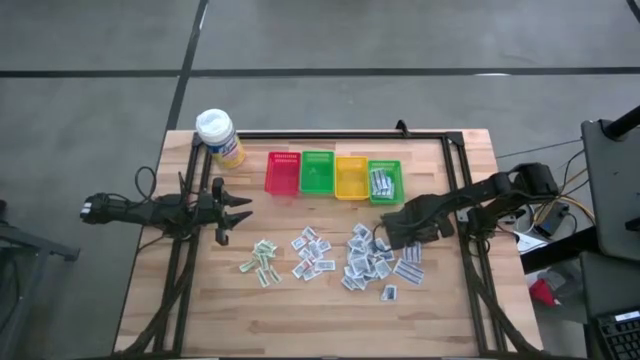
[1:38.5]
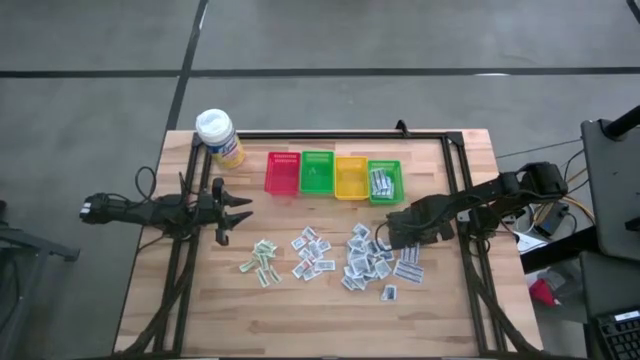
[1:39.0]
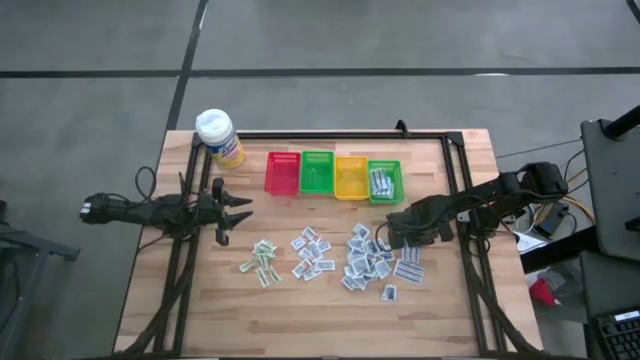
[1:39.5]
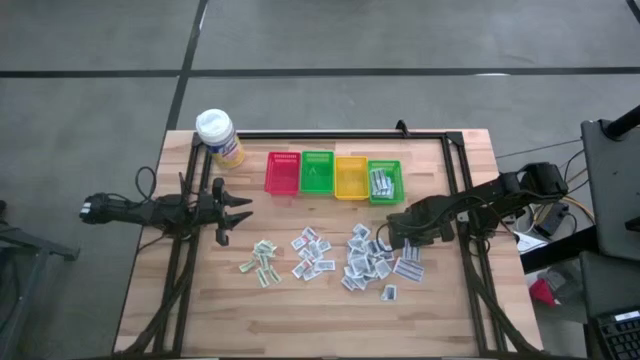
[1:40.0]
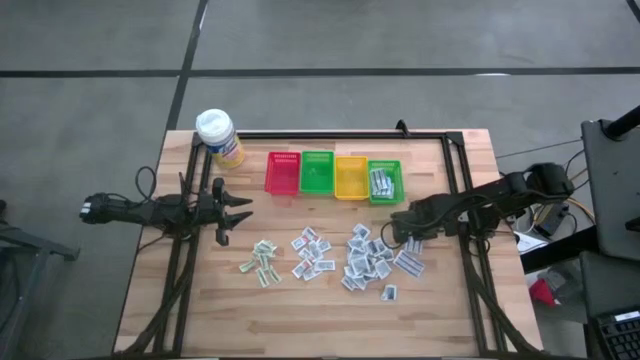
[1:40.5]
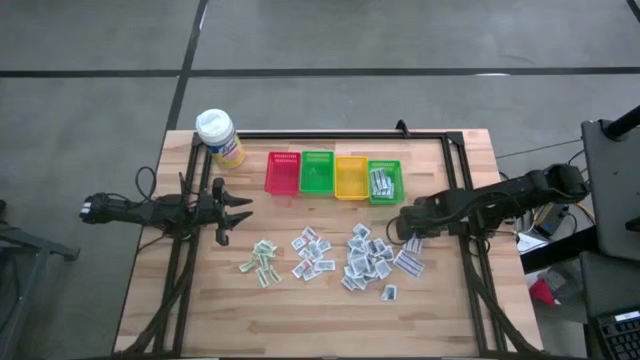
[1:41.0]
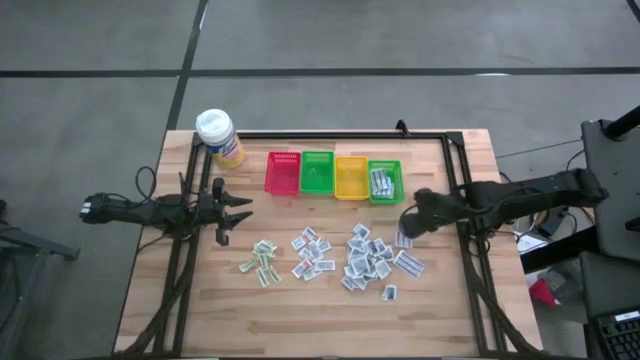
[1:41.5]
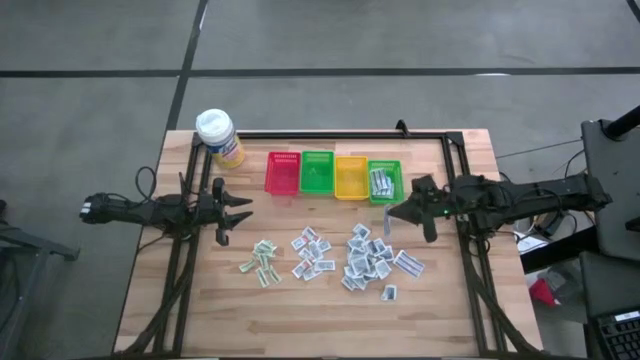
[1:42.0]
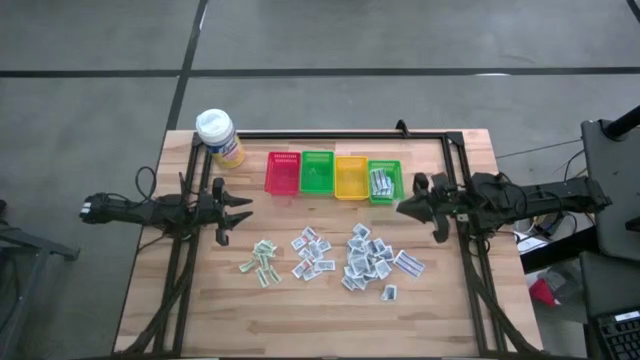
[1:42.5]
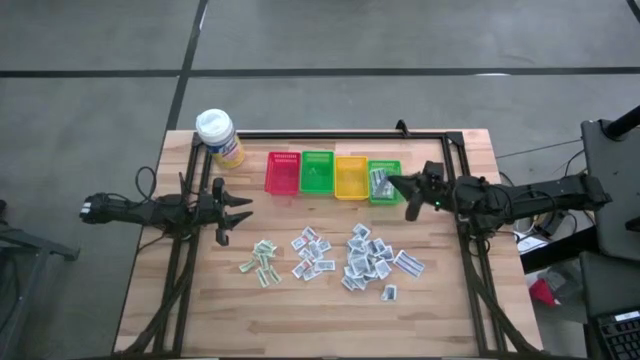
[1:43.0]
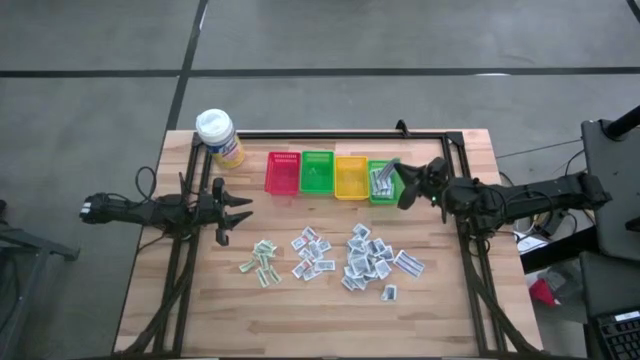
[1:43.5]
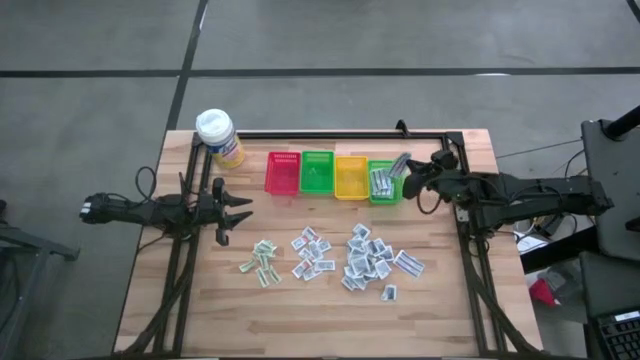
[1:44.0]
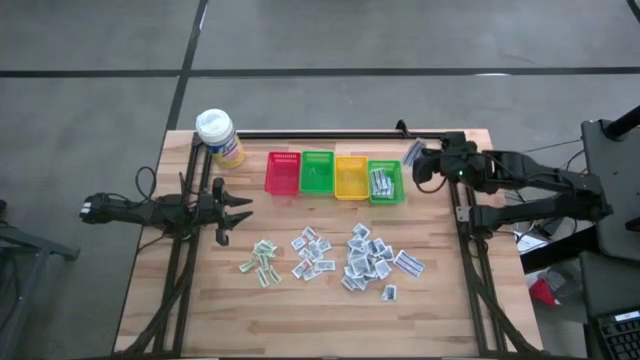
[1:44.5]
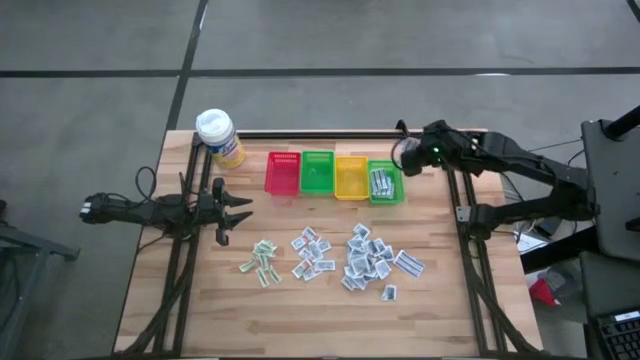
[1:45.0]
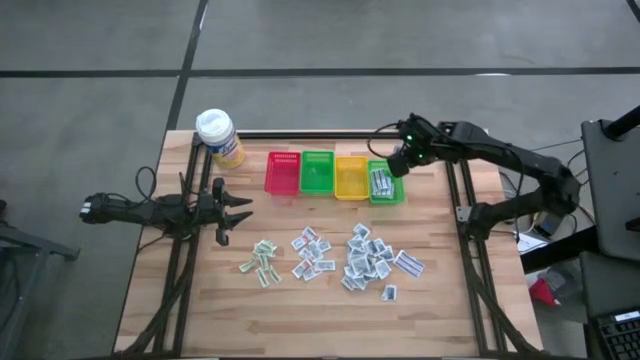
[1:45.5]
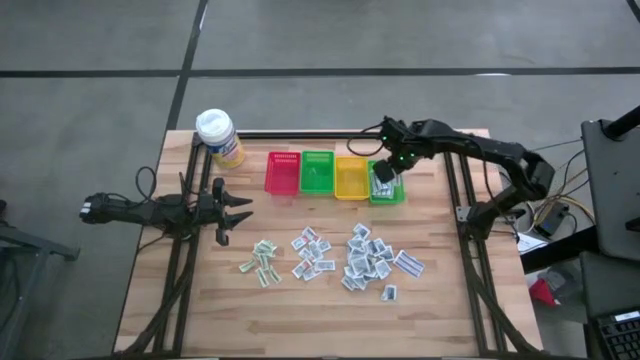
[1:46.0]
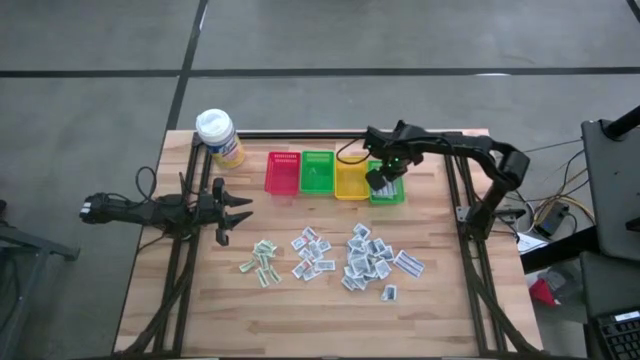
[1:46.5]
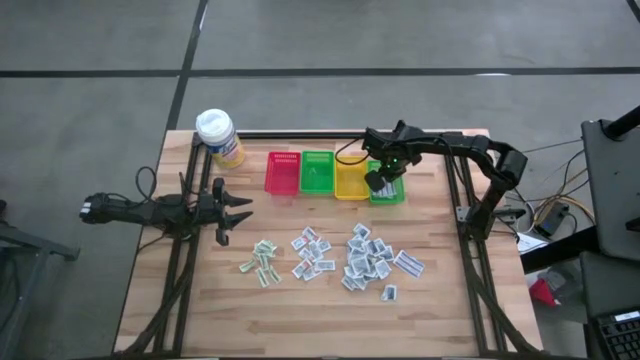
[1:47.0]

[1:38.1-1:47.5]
Task: Pick & Place First Aid Supplies
Put the blue bandage into the right green bin

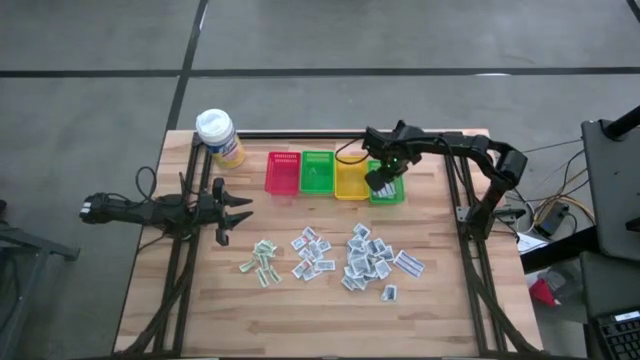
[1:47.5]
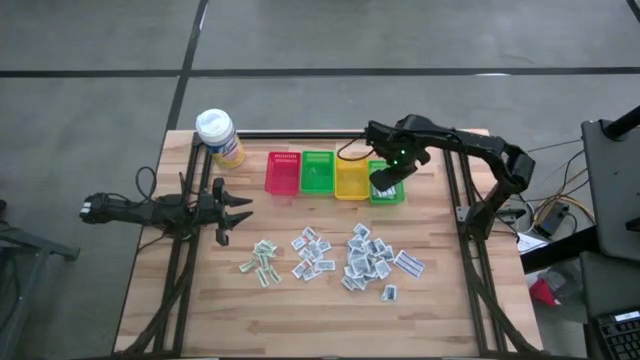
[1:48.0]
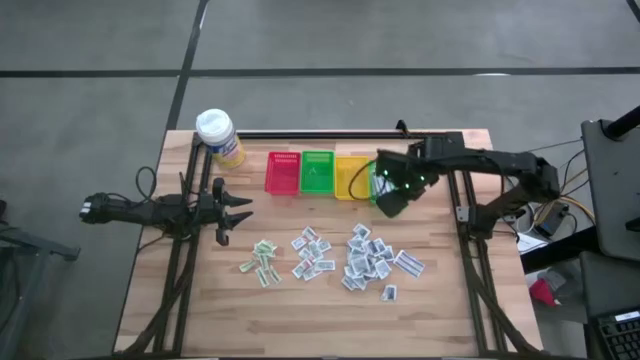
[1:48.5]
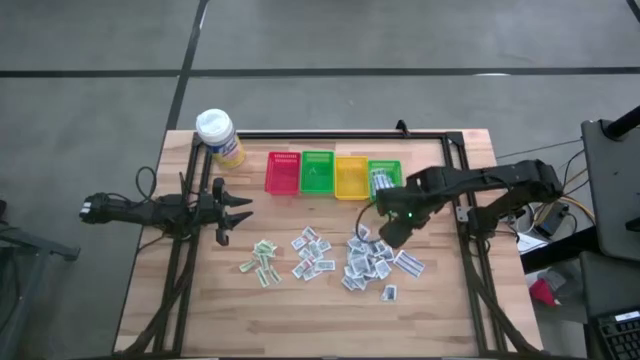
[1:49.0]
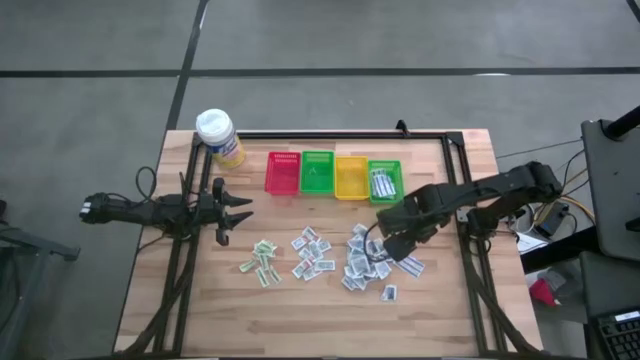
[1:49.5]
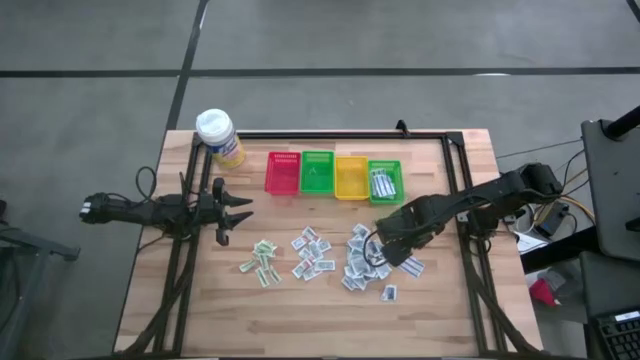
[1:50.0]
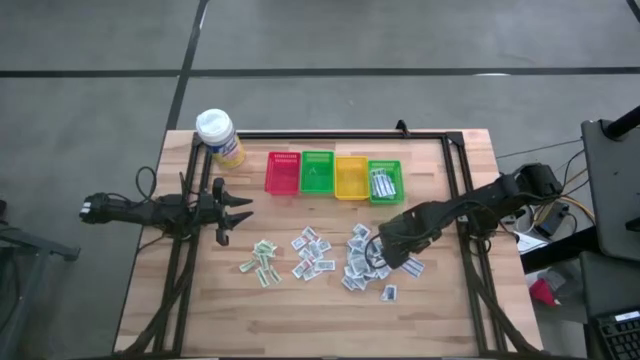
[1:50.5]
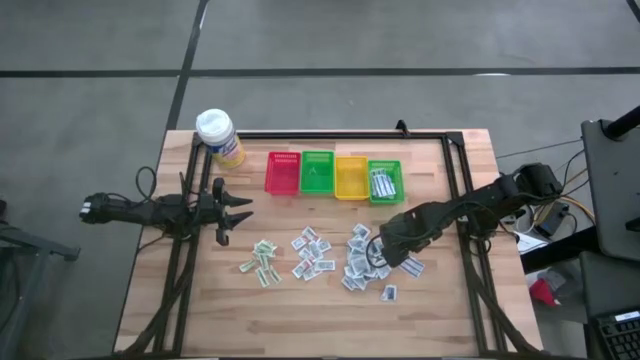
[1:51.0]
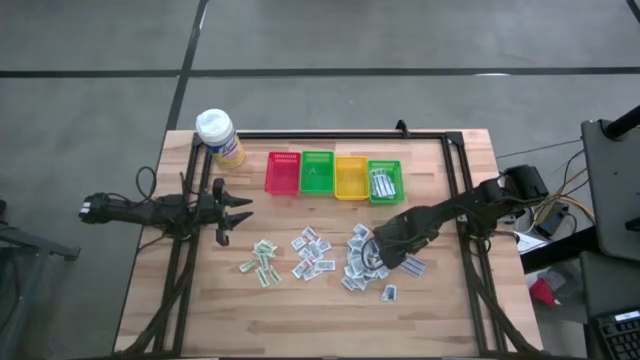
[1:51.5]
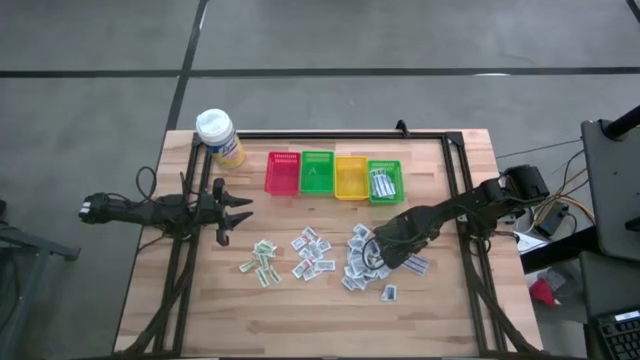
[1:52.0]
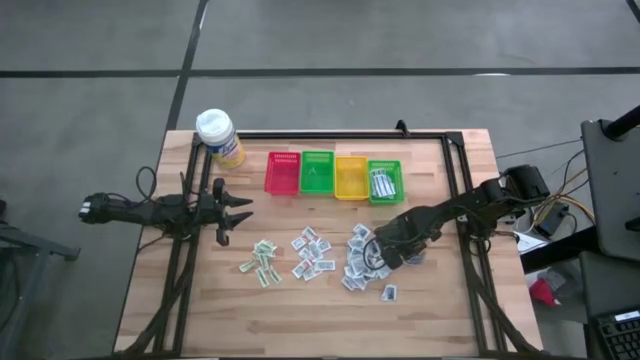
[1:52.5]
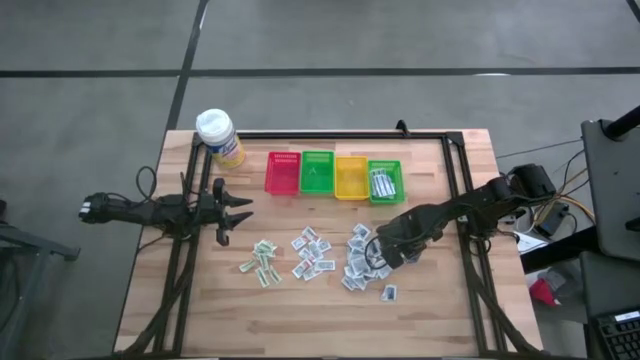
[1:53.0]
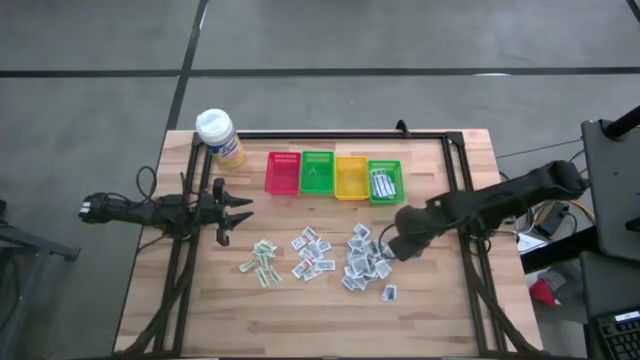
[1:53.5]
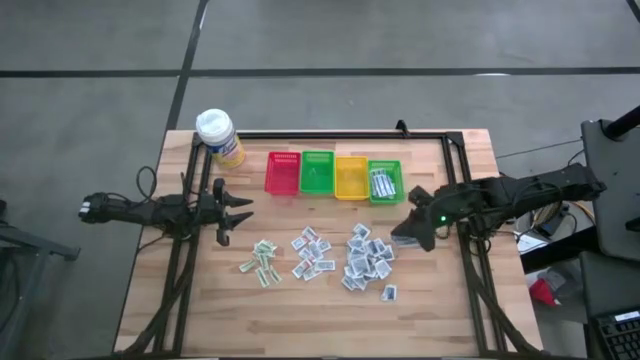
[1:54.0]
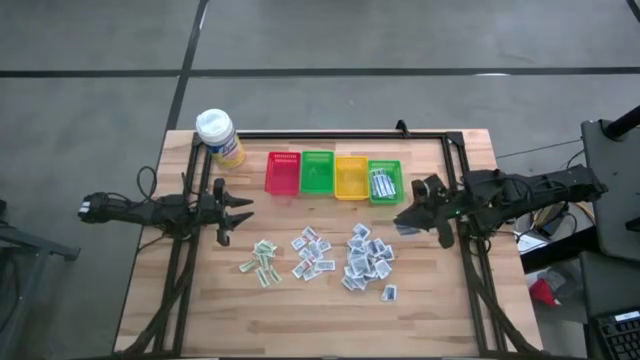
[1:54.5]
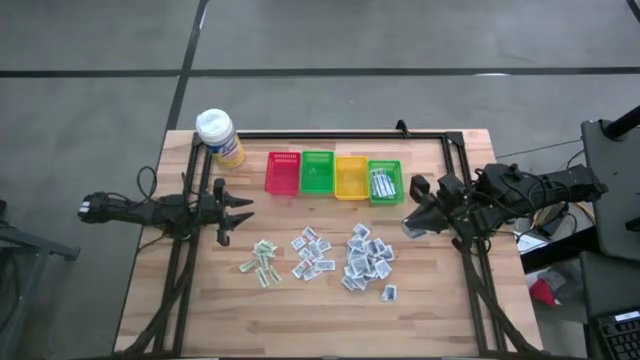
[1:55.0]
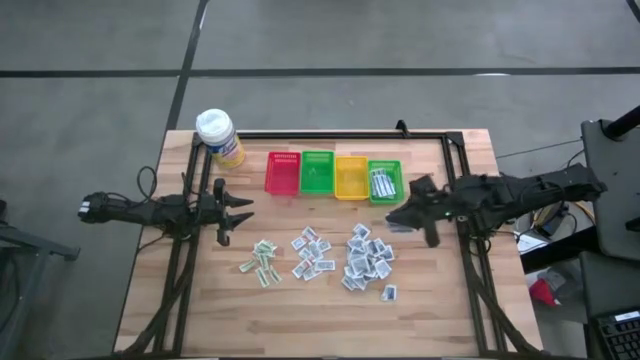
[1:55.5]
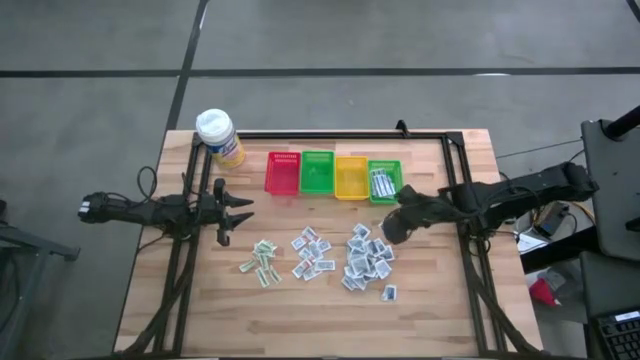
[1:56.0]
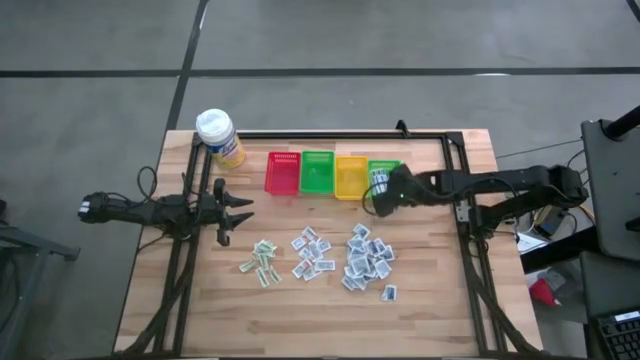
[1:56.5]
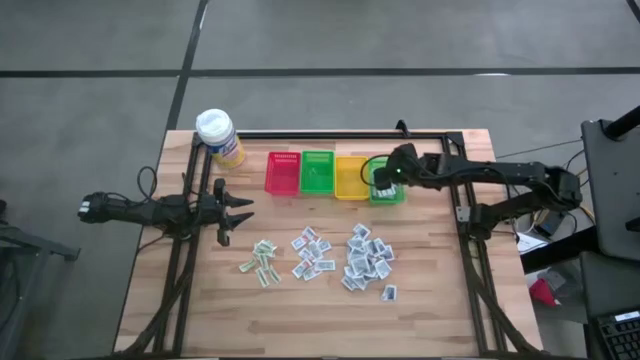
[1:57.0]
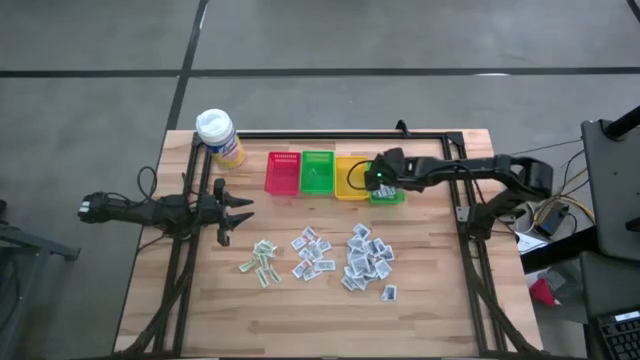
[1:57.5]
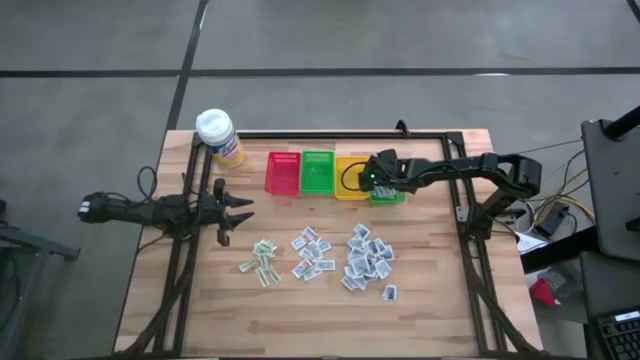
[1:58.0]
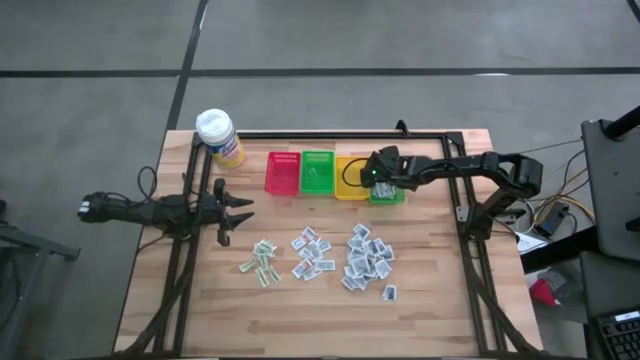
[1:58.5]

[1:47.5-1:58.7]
Put the blue bandage into the right green bin
